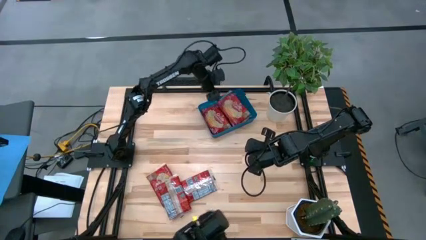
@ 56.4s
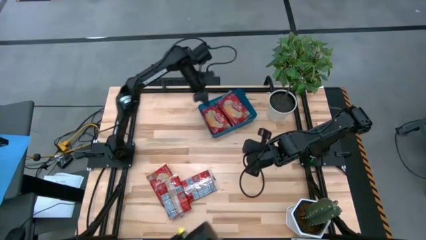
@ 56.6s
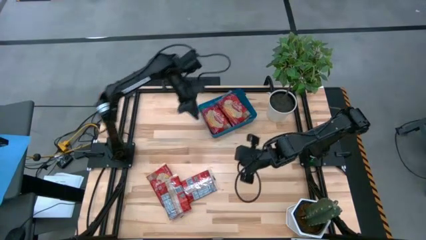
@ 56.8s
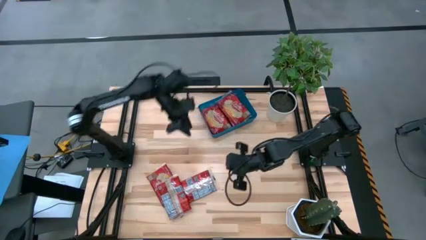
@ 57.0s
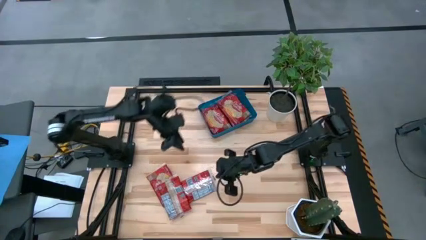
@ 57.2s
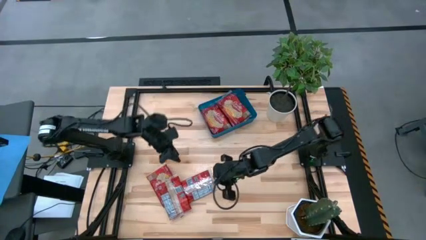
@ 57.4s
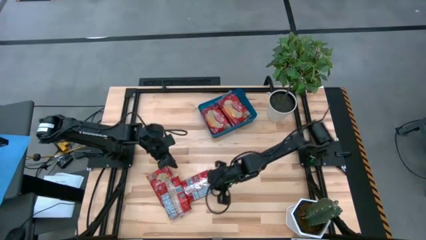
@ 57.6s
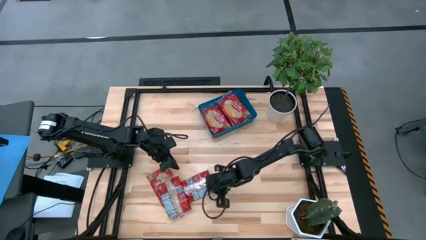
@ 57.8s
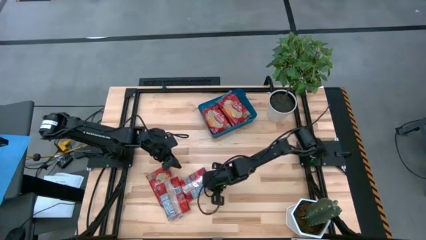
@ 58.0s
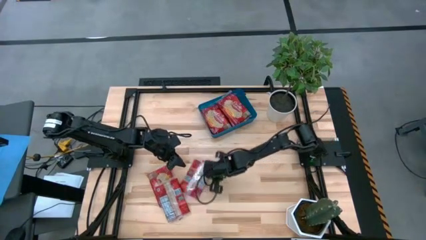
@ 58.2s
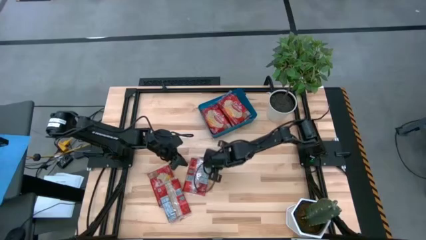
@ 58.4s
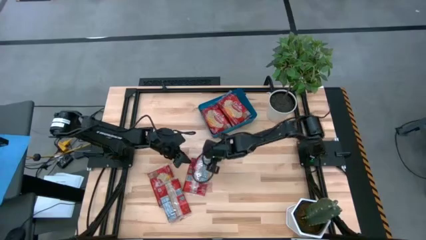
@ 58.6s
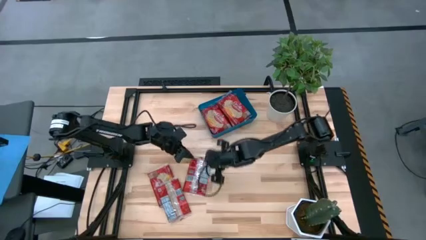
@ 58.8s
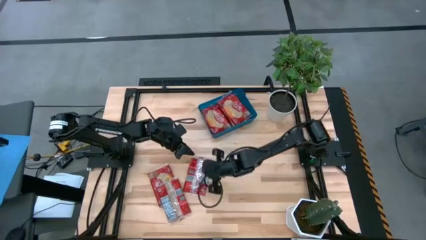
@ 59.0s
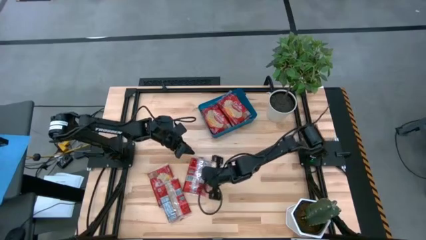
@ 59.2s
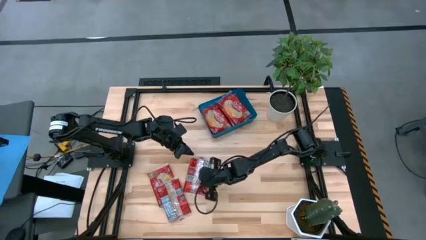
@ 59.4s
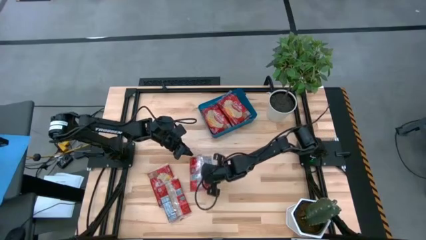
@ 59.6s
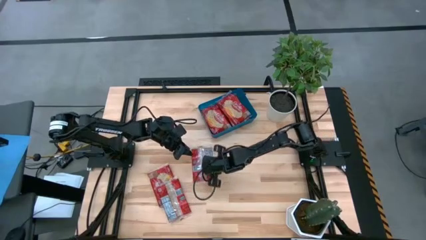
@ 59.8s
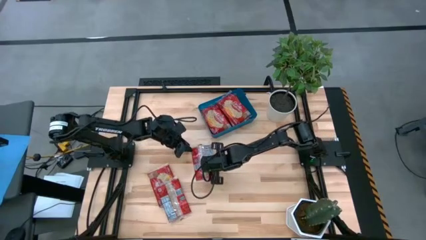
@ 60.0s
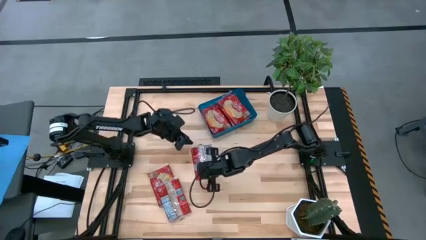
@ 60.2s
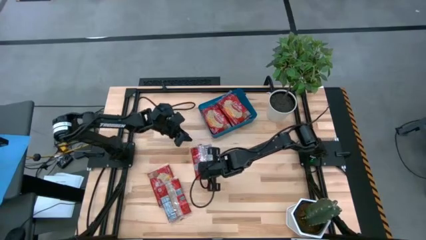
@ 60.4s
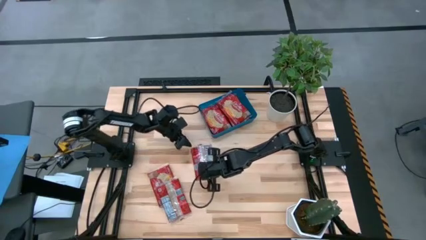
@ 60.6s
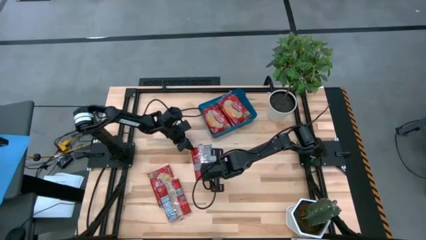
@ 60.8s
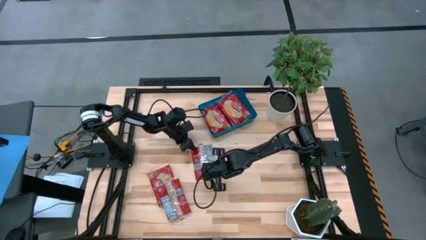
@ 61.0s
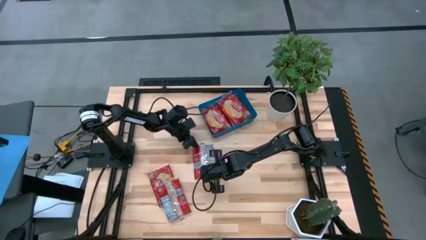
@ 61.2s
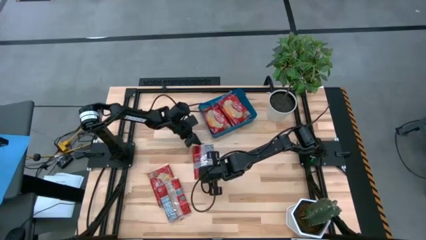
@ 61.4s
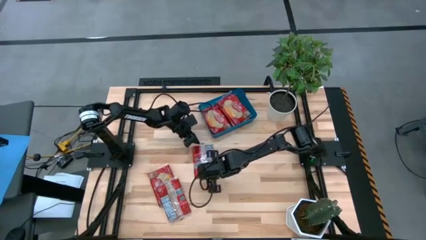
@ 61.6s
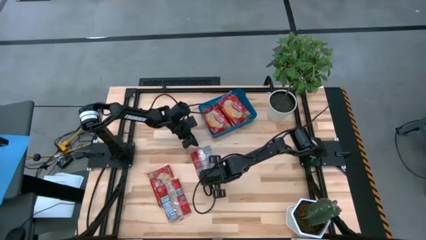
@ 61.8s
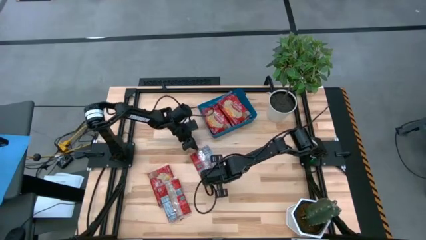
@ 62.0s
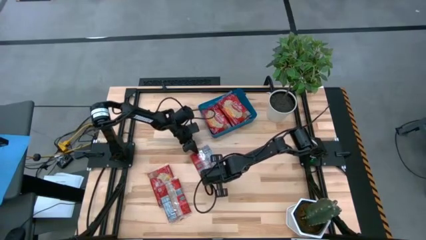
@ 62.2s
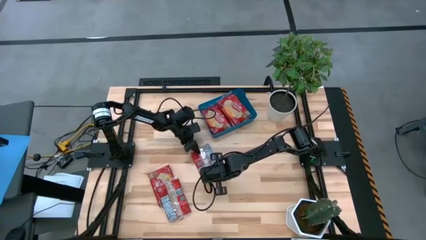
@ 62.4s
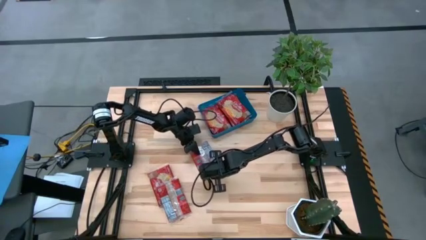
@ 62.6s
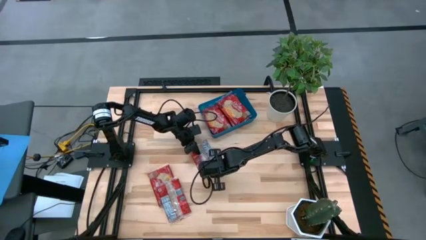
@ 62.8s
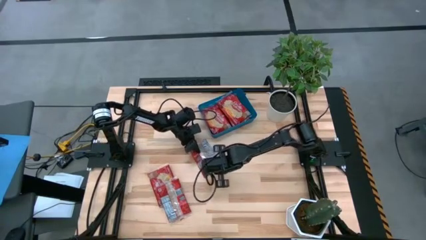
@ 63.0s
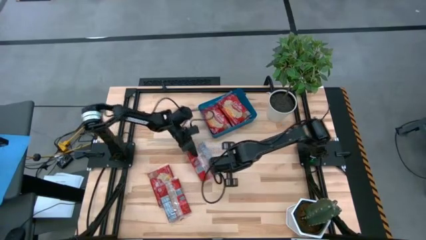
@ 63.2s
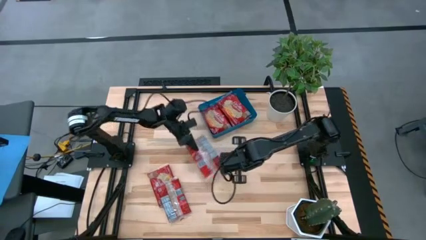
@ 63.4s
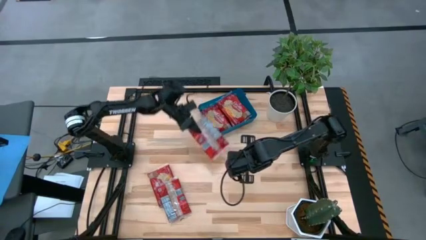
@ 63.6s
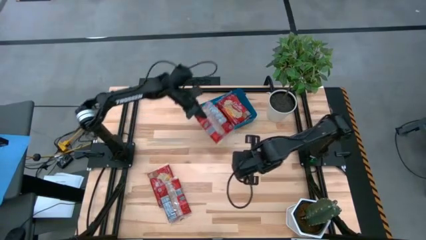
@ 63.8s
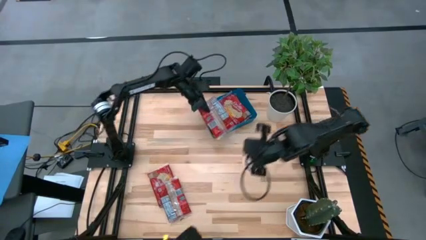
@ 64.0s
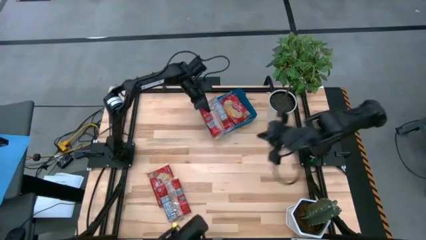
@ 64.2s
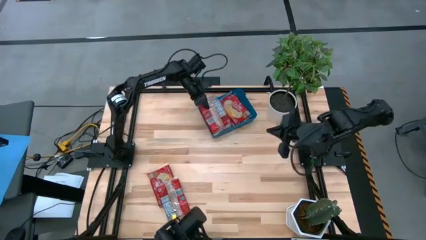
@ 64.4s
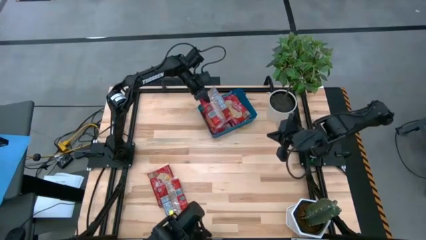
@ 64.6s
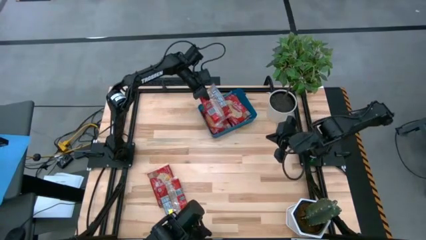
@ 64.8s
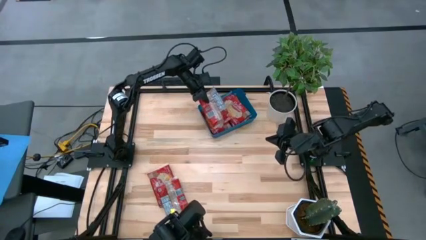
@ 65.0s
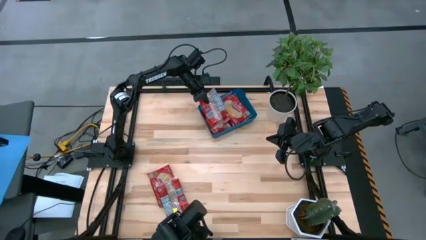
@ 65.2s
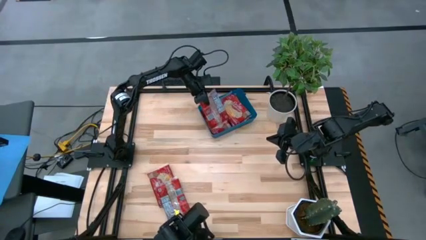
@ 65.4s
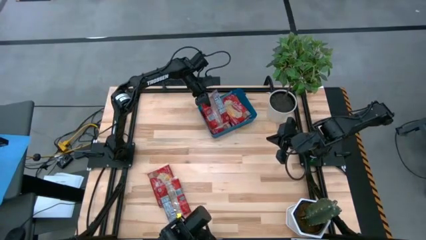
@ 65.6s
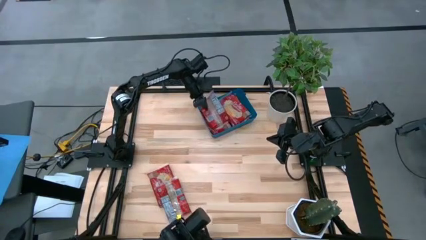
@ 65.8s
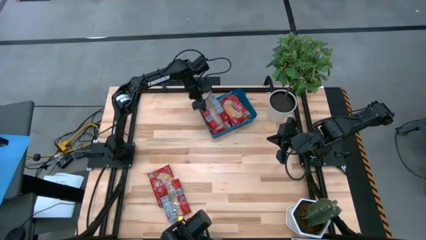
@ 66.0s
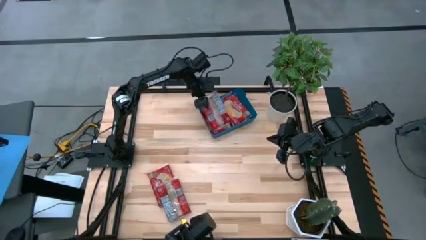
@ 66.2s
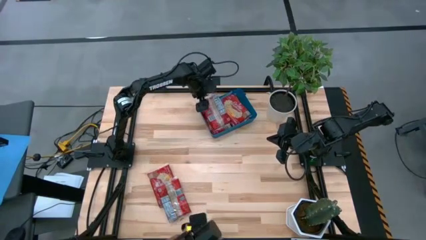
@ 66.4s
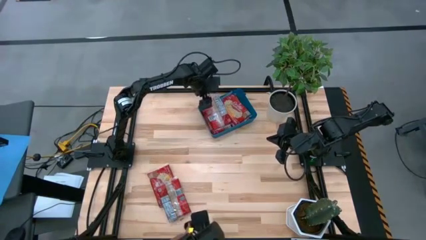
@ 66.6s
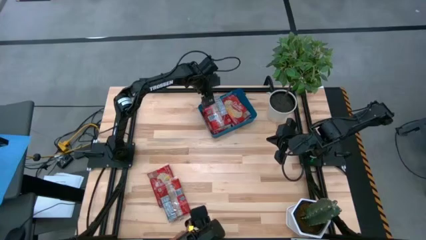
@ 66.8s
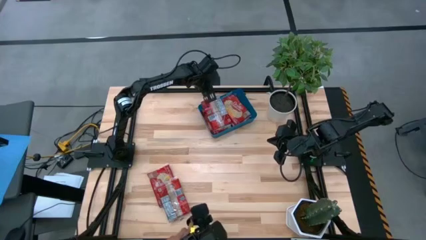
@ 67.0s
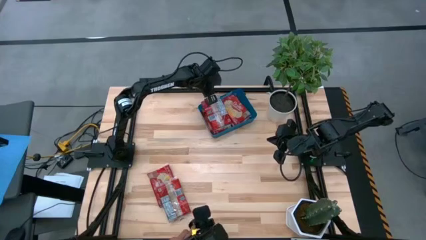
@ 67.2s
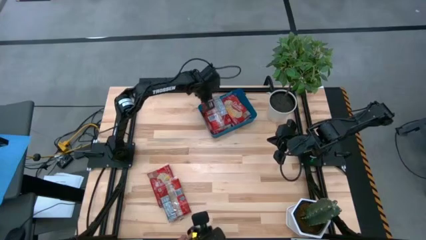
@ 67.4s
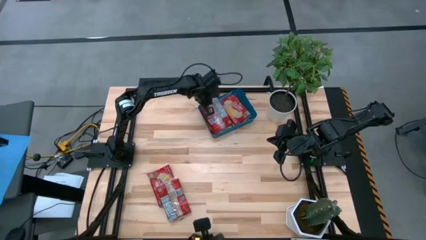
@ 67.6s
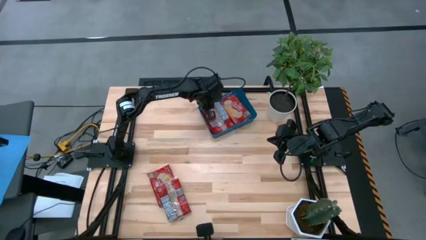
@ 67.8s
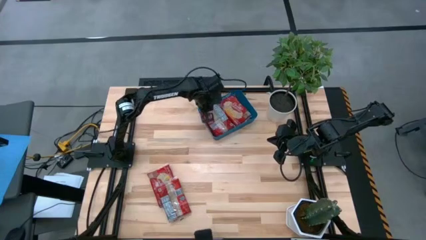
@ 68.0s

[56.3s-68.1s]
Task: Sort popcorn bags into baskets
Put the red popcorn bag into the blue bin

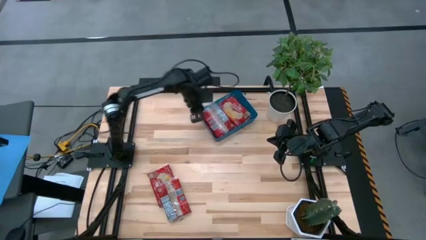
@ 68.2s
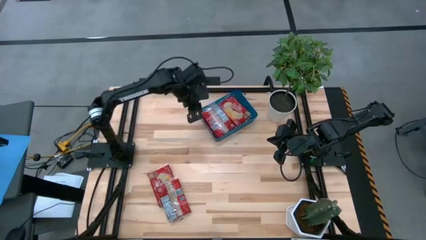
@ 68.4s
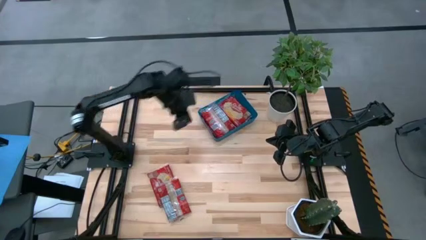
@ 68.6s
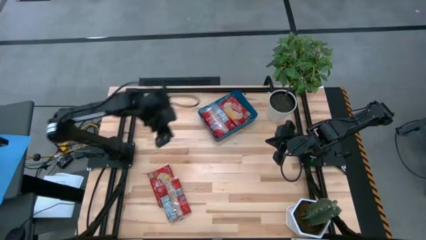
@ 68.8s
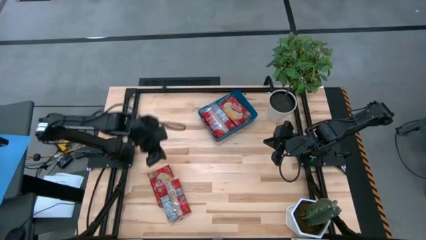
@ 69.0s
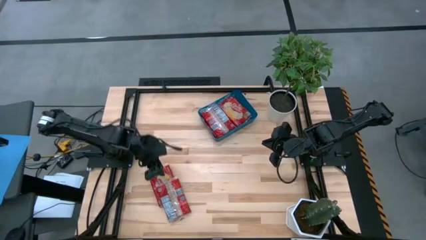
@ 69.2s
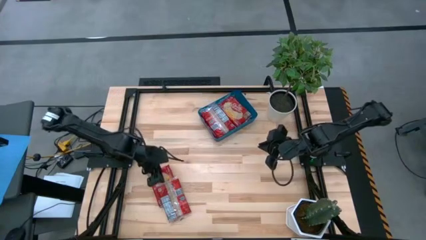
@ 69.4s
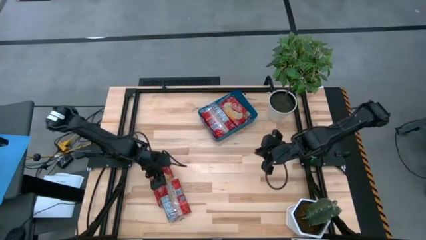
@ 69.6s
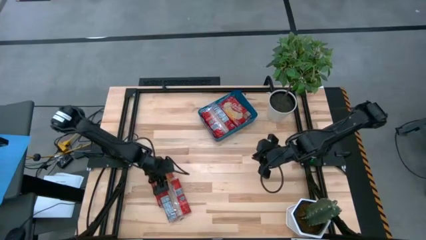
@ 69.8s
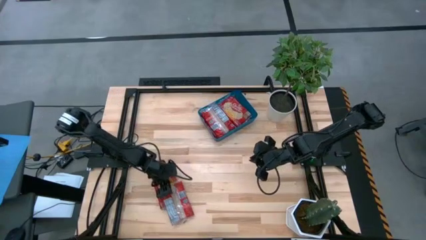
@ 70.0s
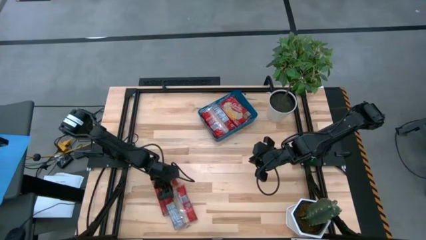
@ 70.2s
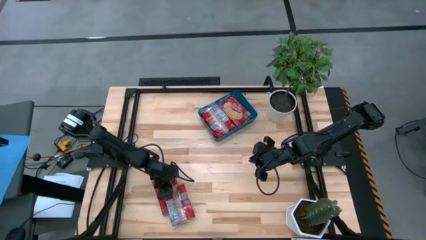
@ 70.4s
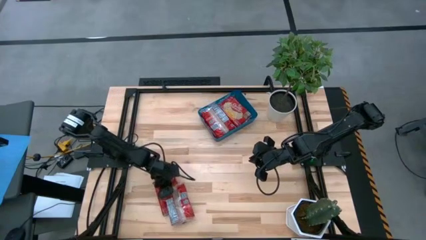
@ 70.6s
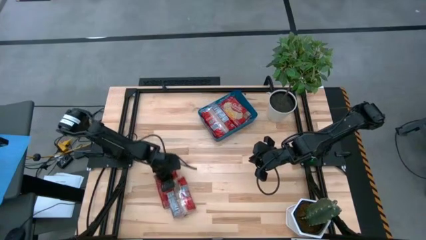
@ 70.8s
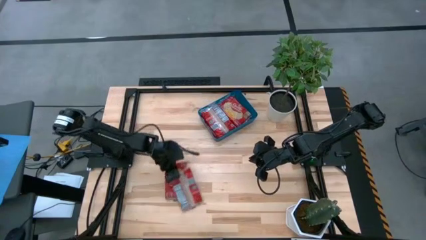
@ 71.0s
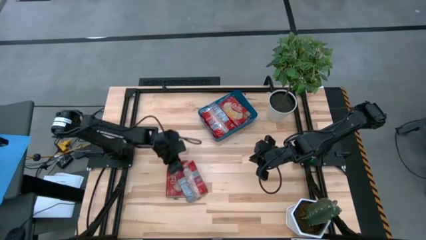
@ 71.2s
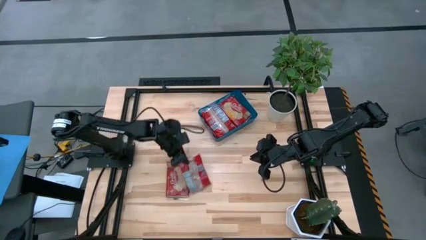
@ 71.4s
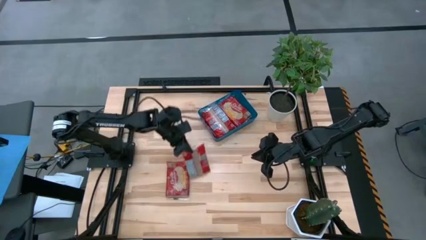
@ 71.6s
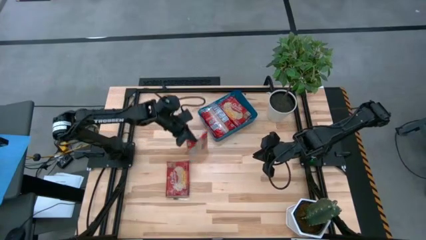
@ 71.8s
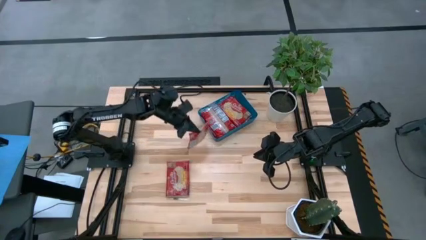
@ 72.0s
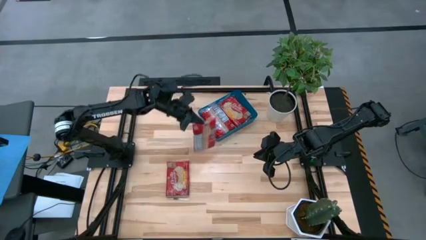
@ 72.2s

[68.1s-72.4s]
Put the red popcorn bag into the blue bin
